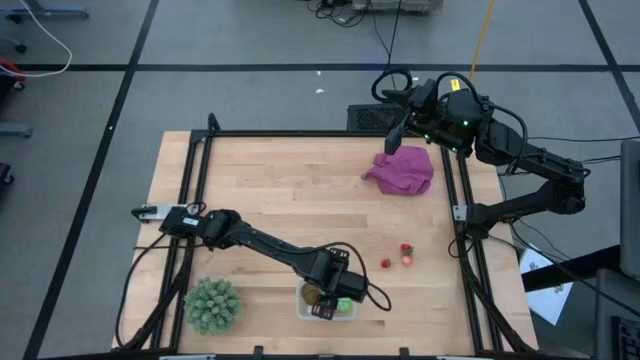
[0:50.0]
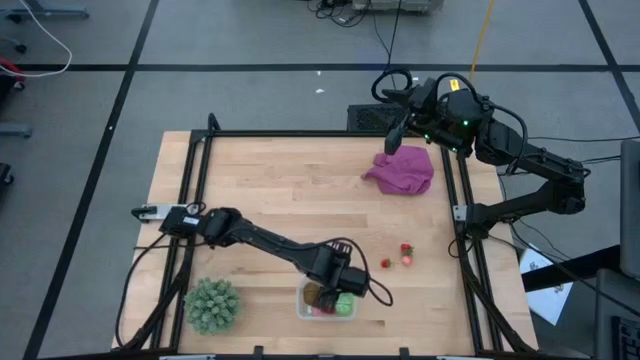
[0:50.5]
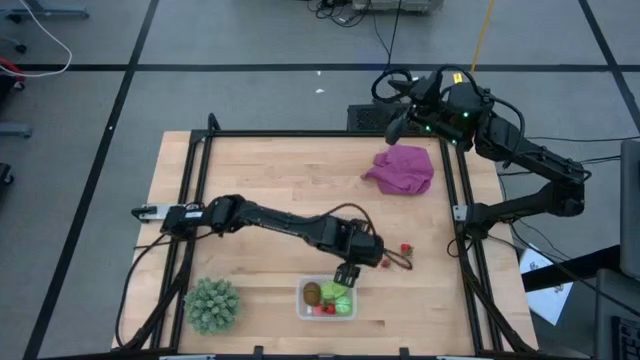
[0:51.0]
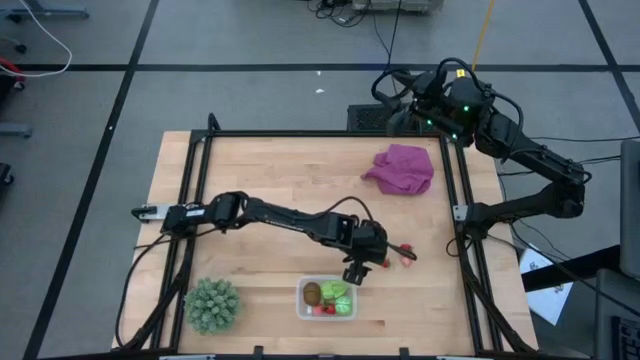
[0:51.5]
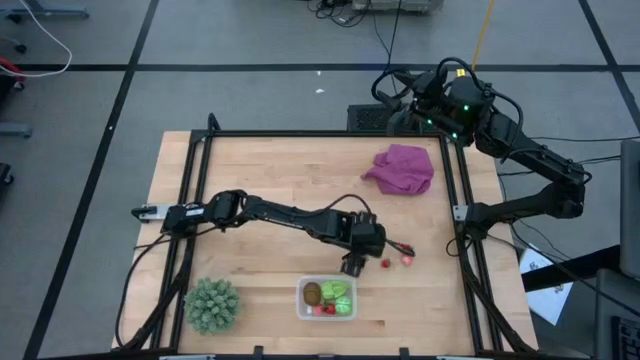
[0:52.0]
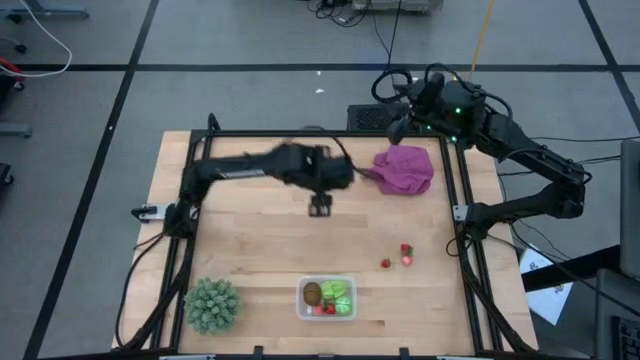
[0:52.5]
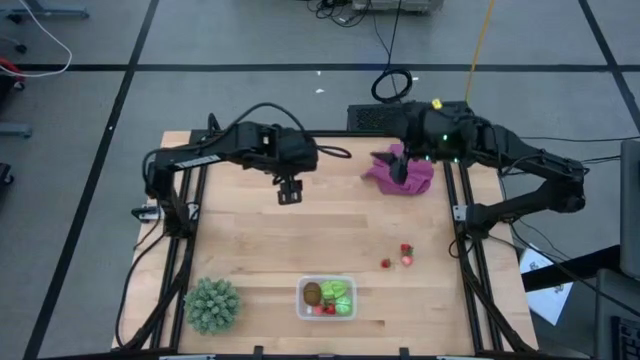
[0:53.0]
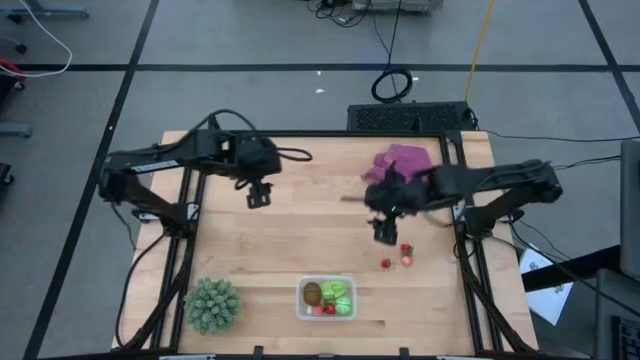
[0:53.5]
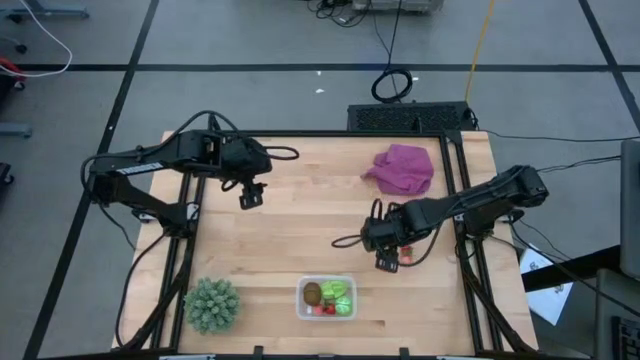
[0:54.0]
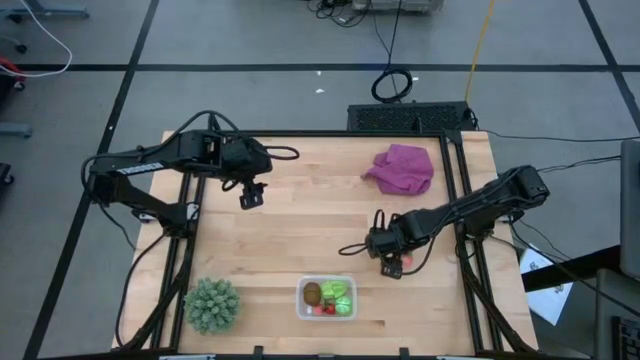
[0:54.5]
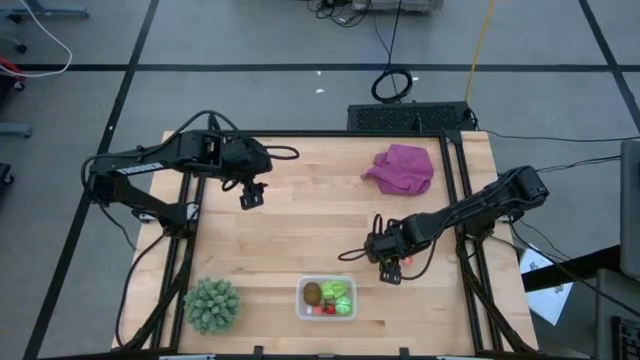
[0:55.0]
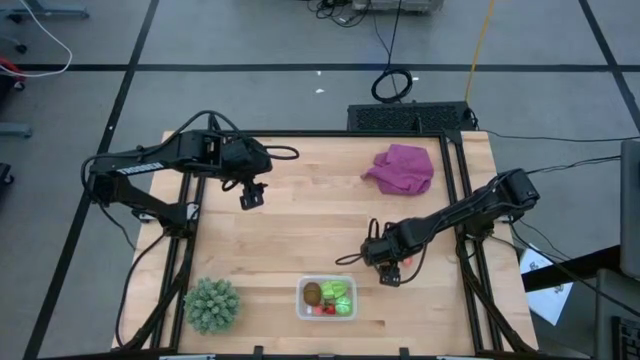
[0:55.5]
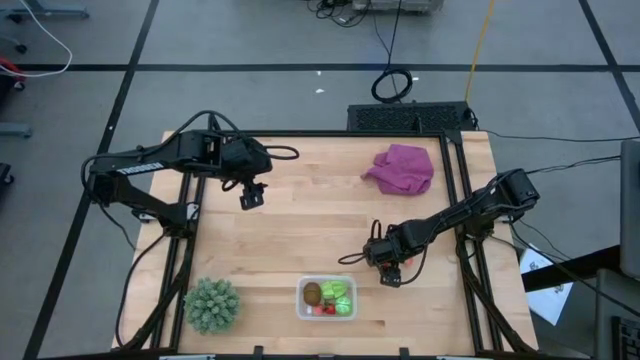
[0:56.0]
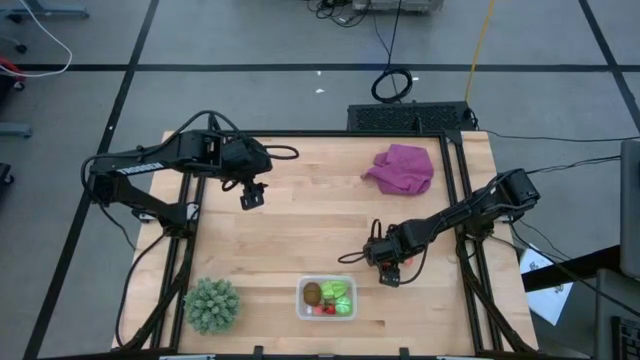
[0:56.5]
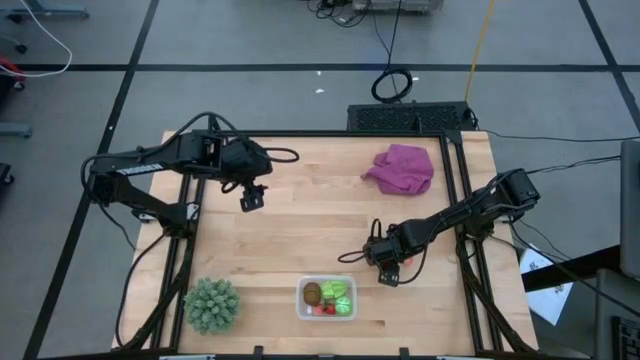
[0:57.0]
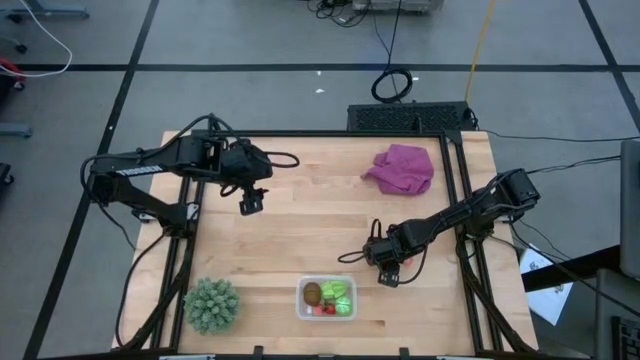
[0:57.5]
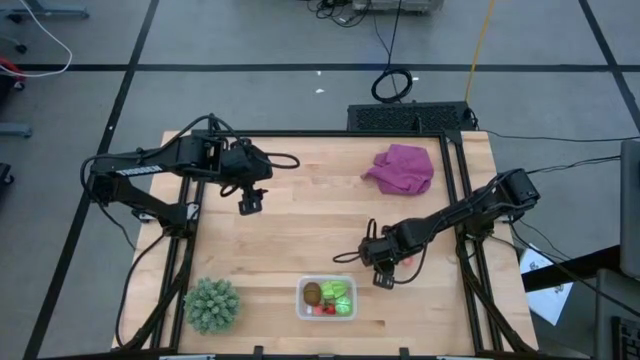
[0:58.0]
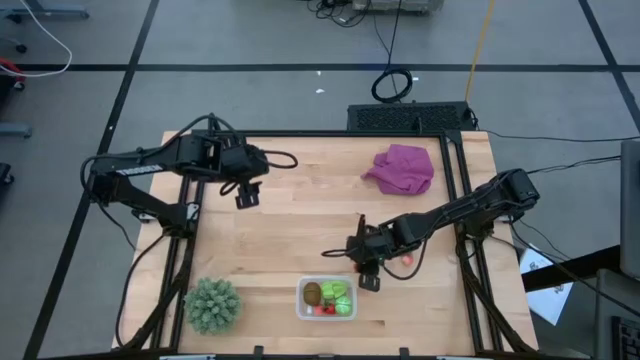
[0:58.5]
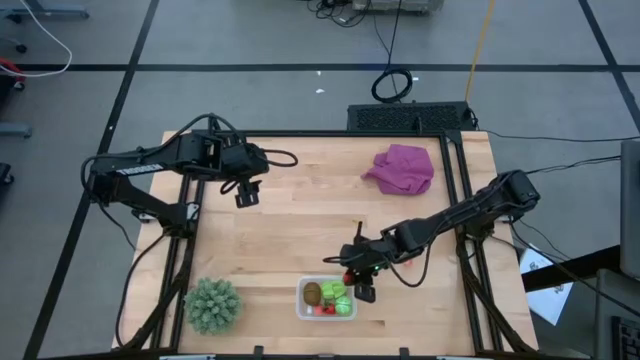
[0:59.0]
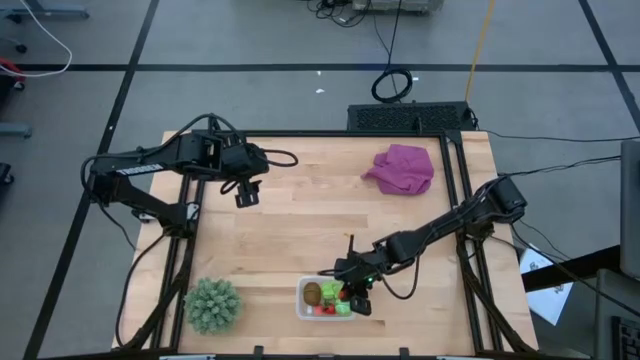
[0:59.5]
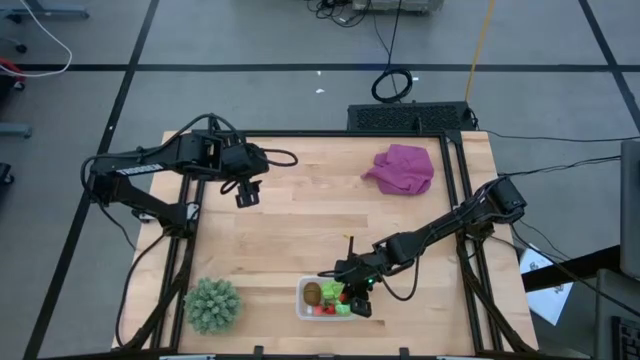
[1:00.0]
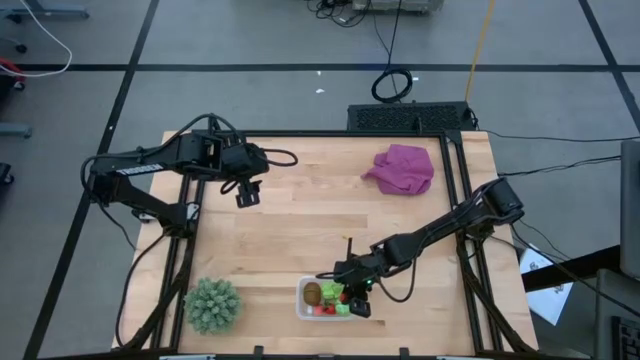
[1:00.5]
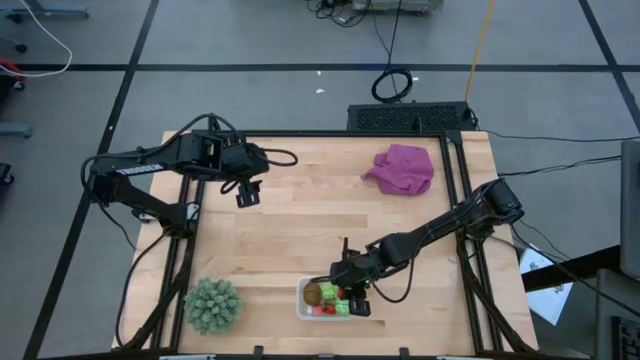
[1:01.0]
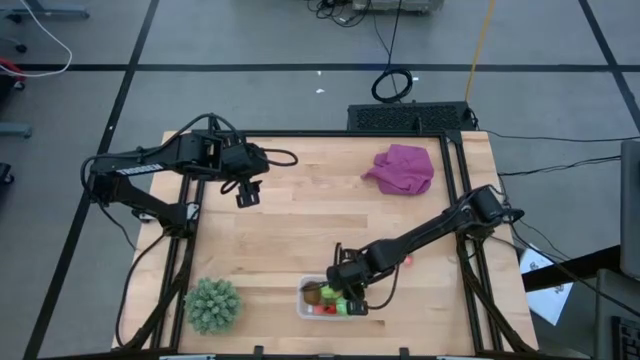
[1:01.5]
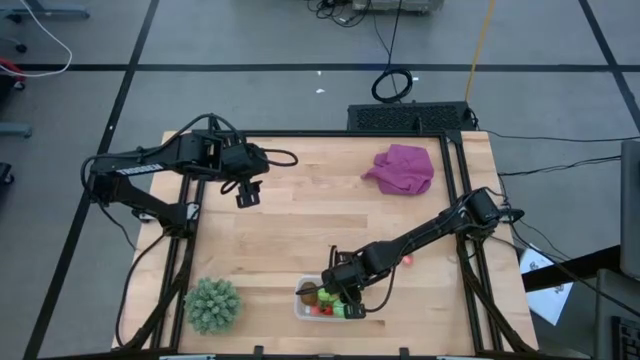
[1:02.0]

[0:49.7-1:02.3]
Task: Pick and placing Produce into tupperware
Put the left red strawberry into the transparent bin

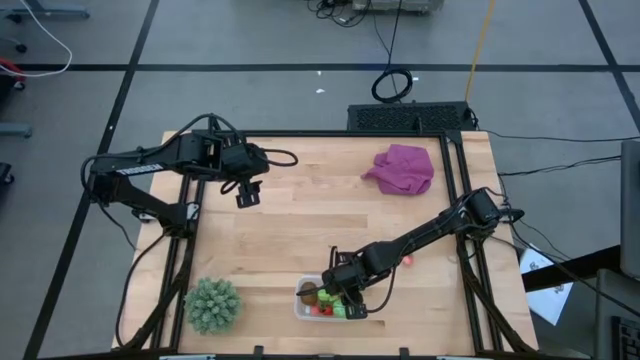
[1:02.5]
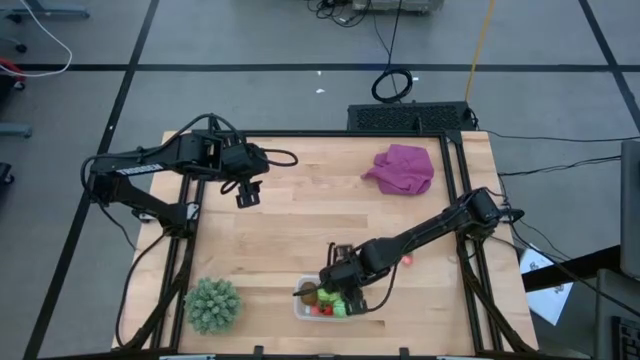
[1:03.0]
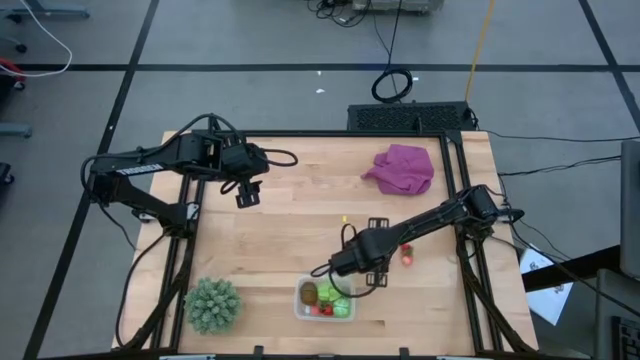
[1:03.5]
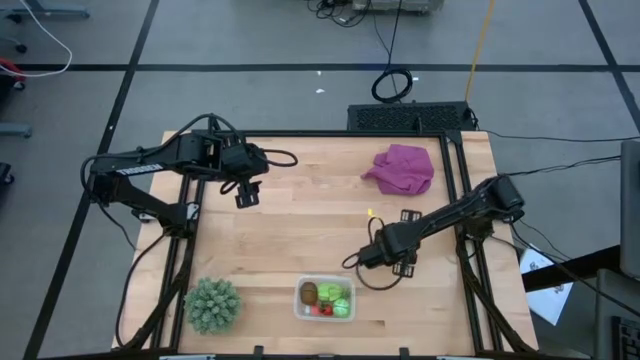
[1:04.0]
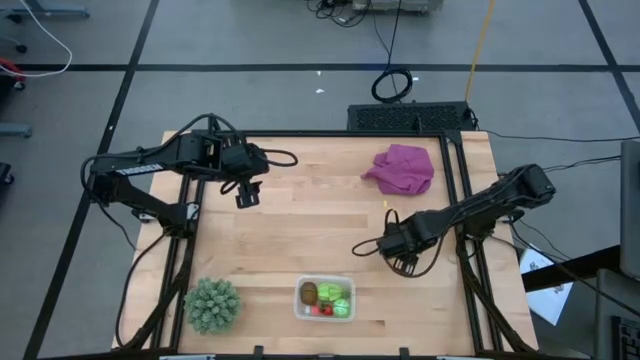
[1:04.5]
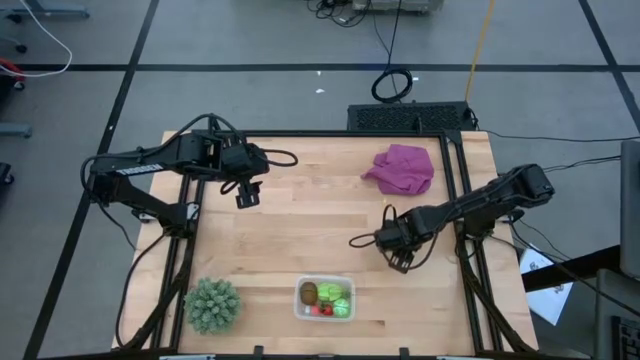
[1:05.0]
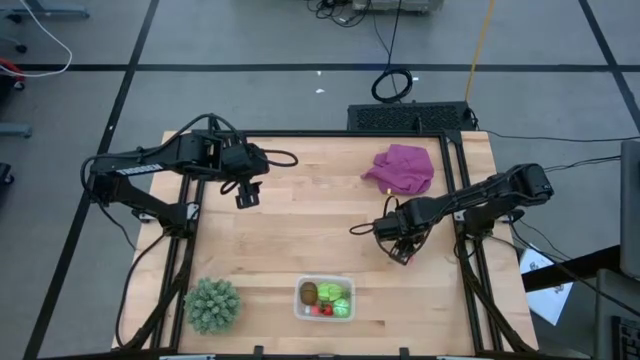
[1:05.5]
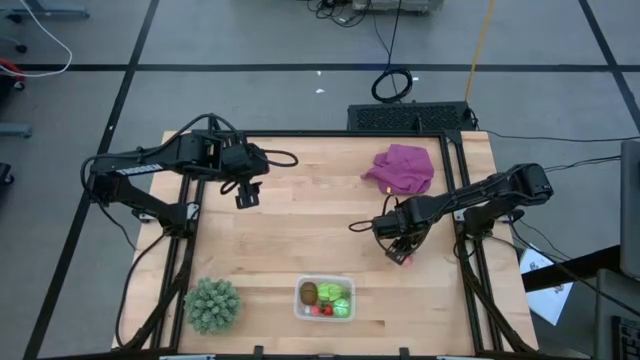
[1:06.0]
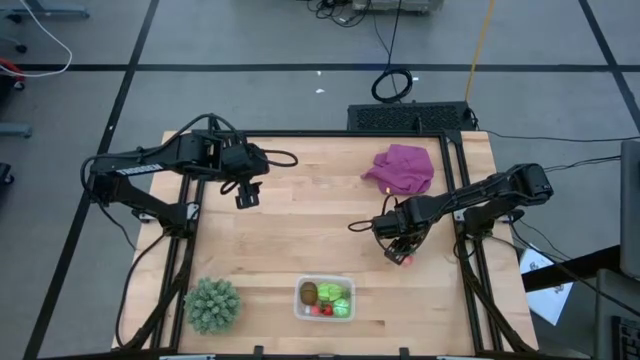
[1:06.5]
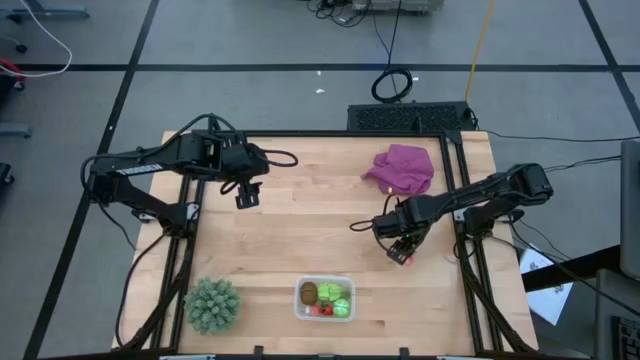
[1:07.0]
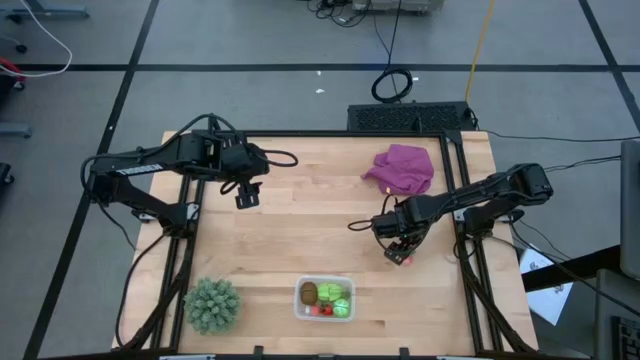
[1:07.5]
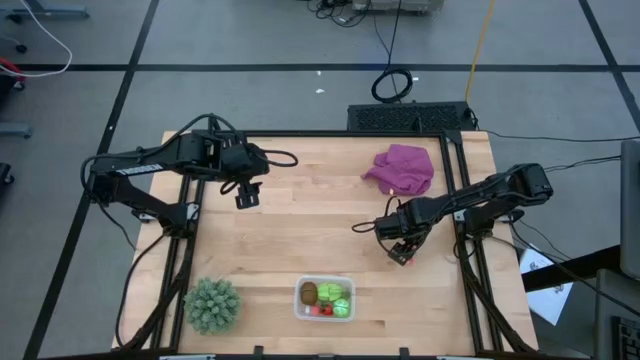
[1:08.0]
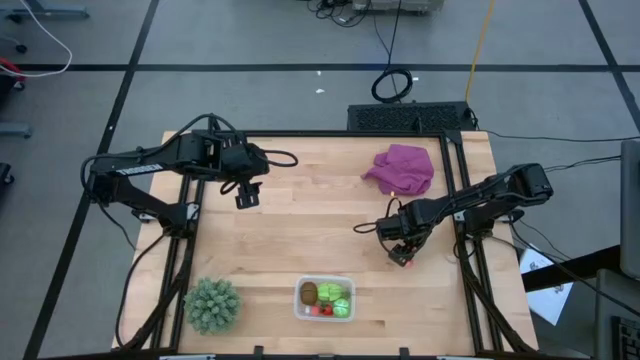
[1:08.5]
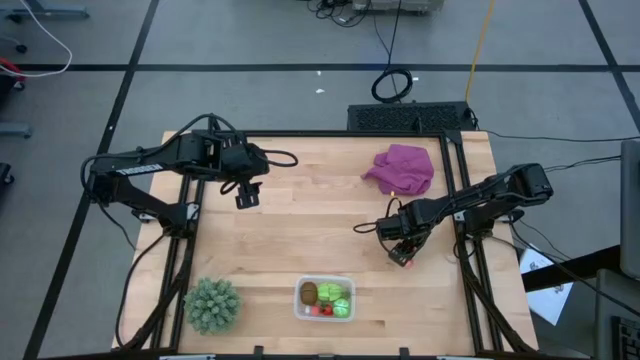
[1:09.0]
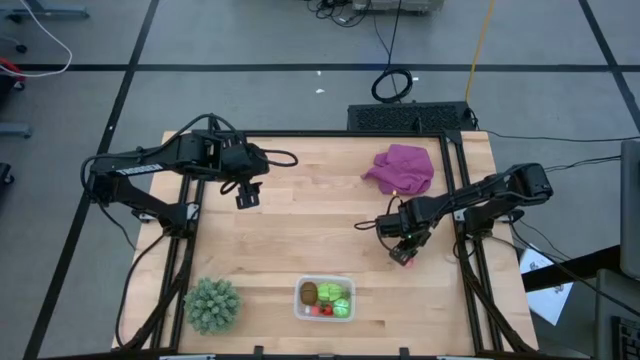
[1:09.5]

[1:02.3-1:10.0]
Put the strawberry into the transparent bin

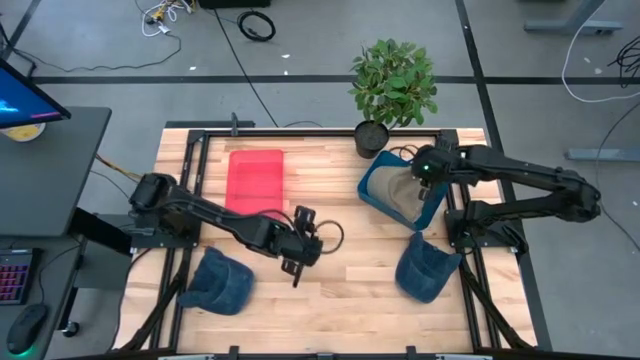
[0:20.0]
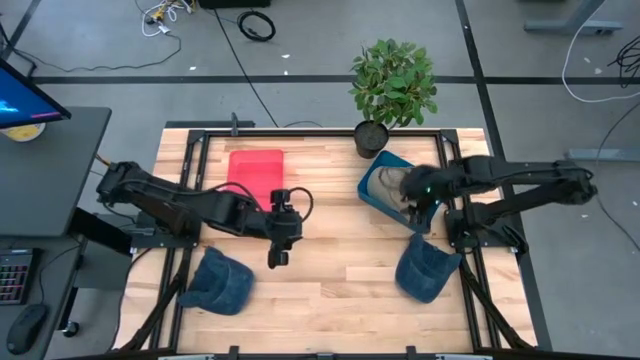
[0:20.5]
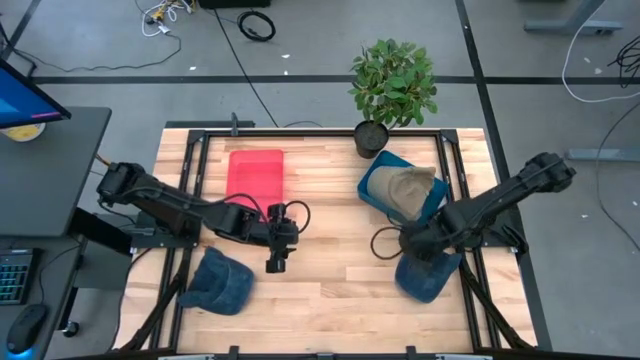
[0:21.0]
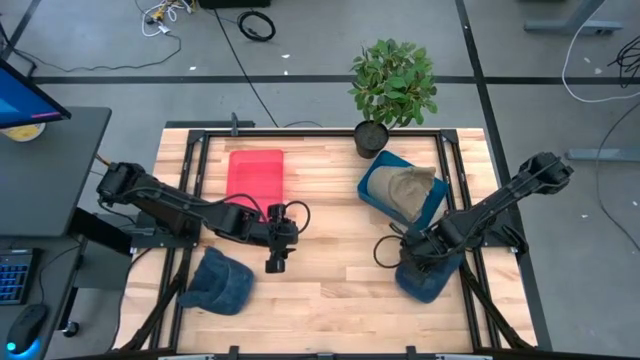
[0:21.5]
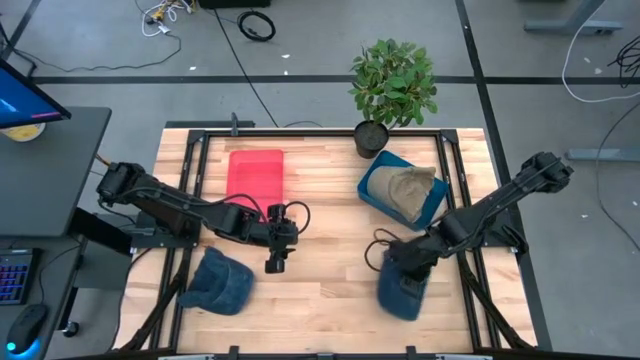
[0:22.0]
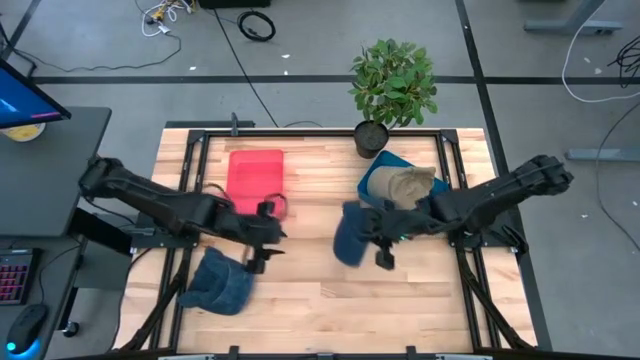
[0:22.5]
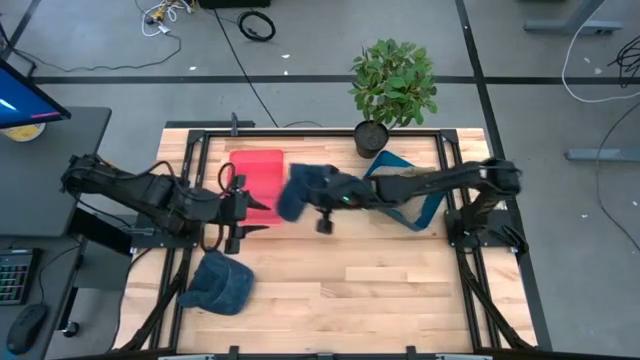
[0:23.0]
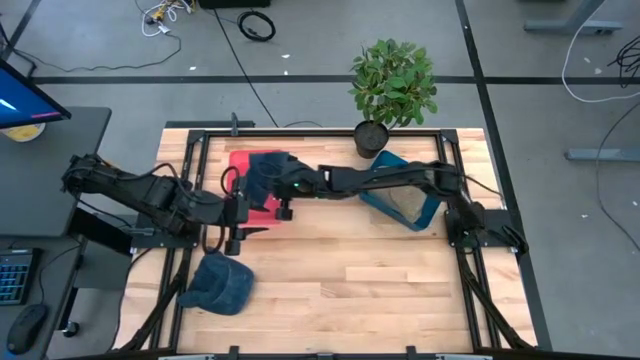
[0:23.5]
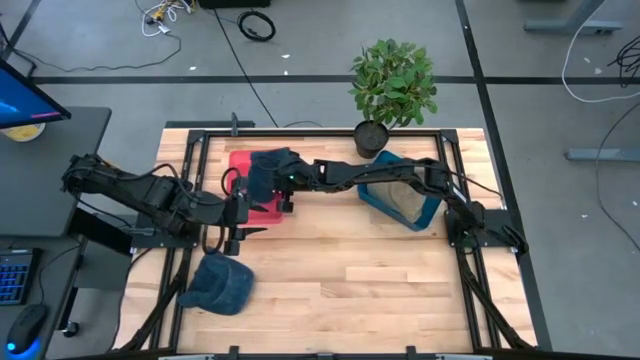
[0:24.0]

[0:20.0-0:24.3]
Task: Pick & Place hat
Put the right blue cap into the red bin
